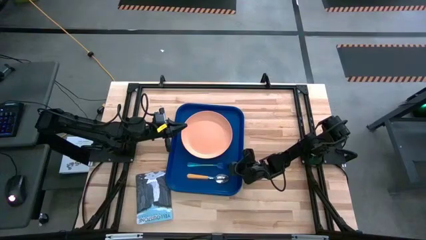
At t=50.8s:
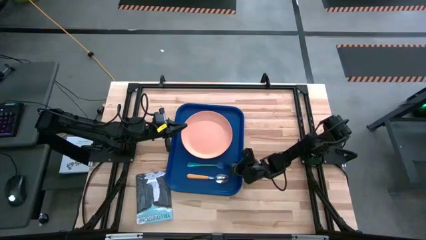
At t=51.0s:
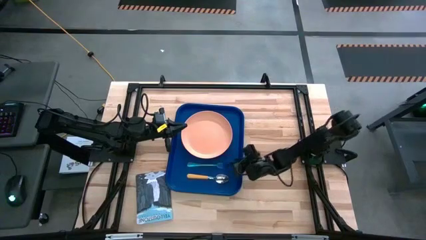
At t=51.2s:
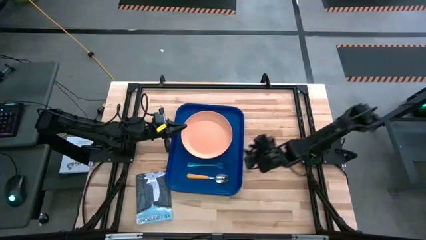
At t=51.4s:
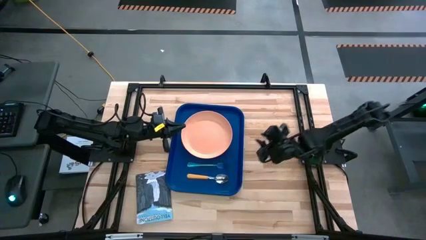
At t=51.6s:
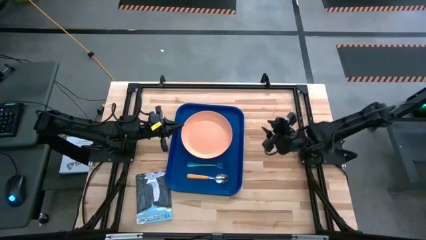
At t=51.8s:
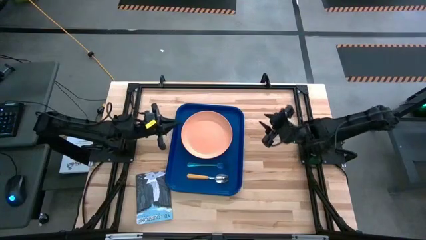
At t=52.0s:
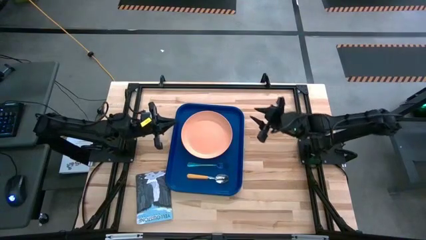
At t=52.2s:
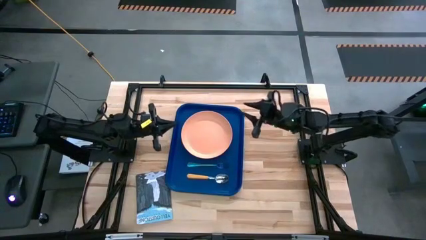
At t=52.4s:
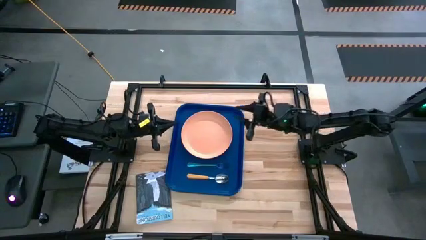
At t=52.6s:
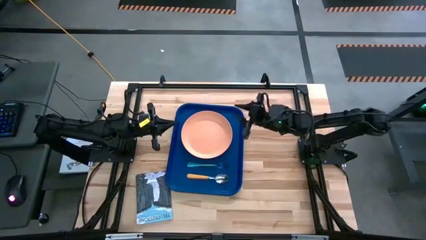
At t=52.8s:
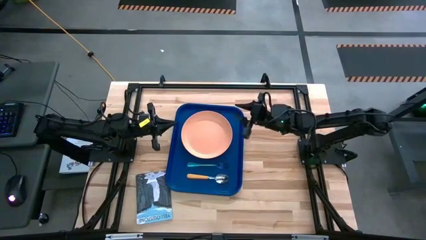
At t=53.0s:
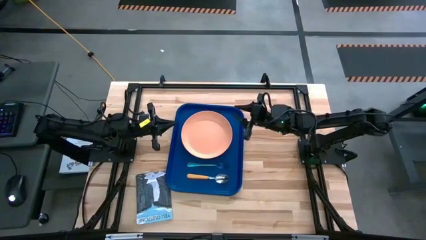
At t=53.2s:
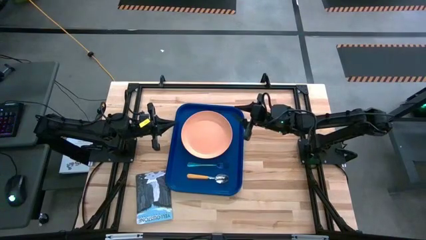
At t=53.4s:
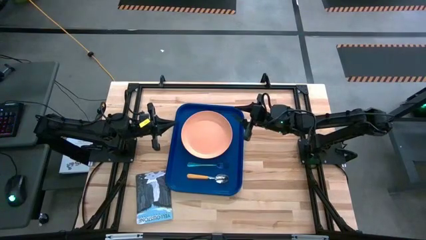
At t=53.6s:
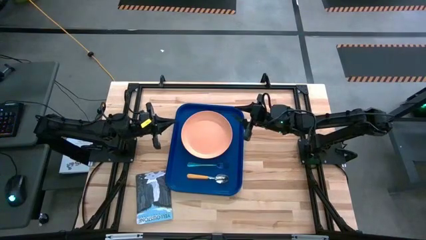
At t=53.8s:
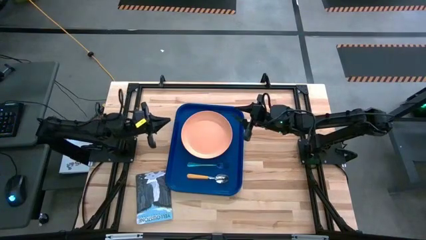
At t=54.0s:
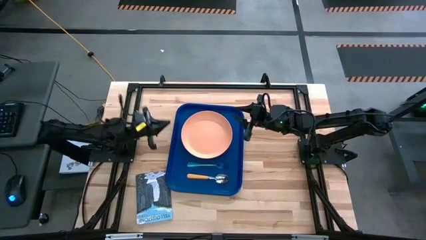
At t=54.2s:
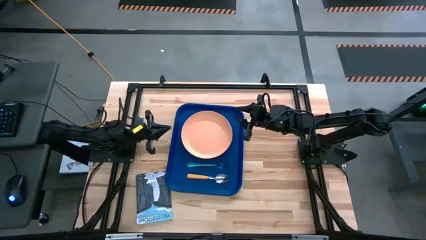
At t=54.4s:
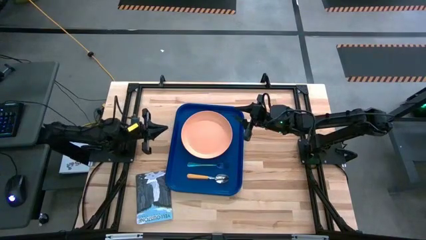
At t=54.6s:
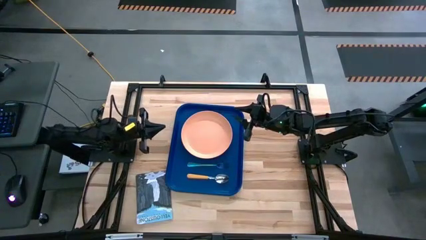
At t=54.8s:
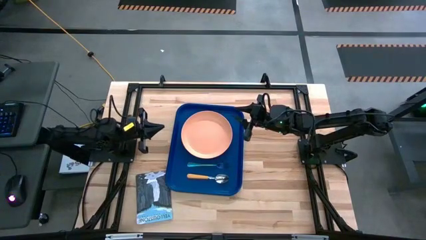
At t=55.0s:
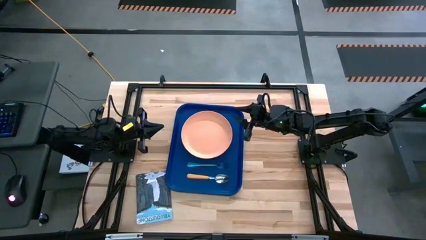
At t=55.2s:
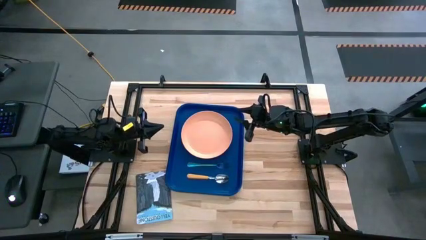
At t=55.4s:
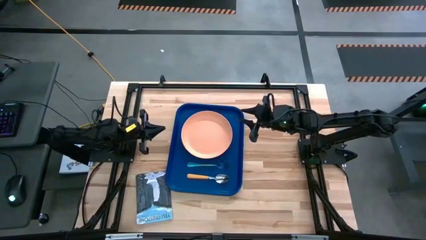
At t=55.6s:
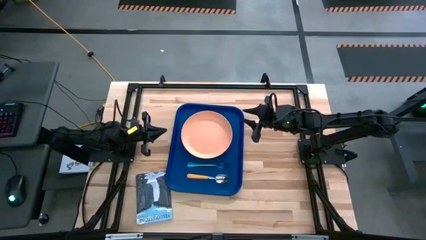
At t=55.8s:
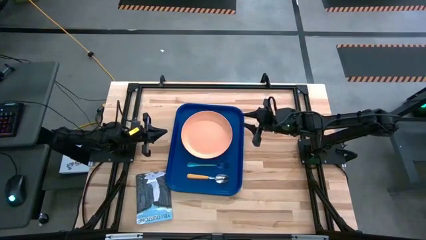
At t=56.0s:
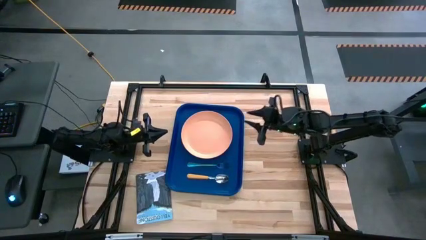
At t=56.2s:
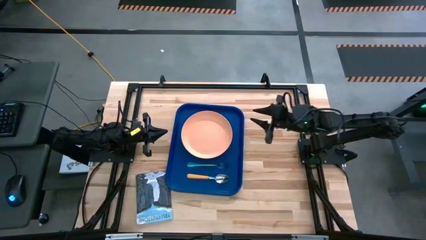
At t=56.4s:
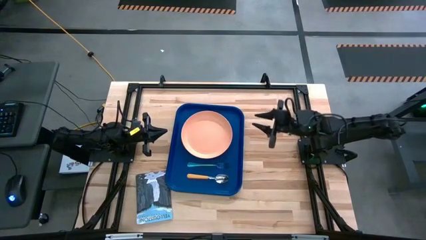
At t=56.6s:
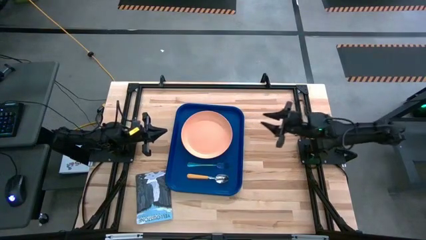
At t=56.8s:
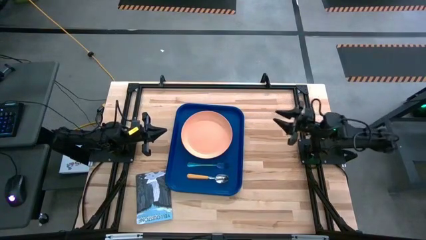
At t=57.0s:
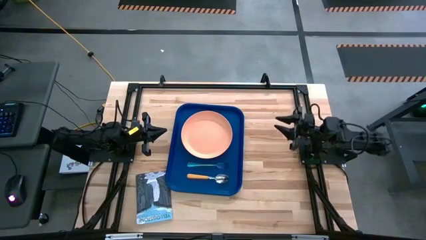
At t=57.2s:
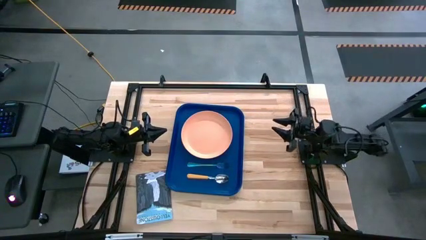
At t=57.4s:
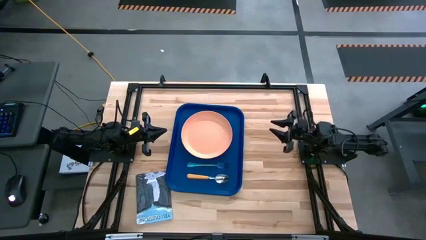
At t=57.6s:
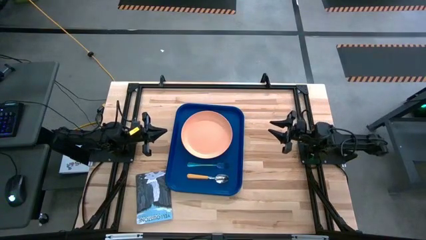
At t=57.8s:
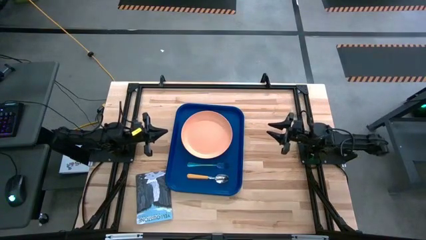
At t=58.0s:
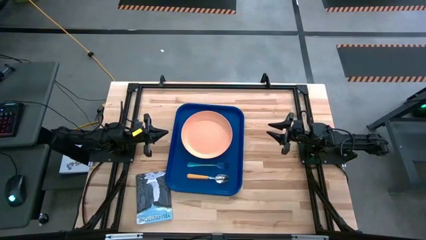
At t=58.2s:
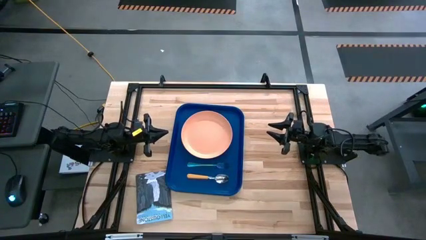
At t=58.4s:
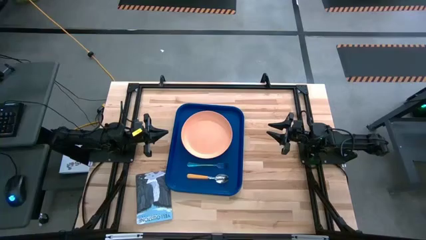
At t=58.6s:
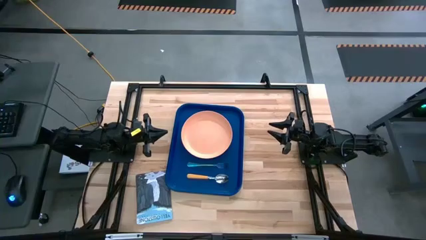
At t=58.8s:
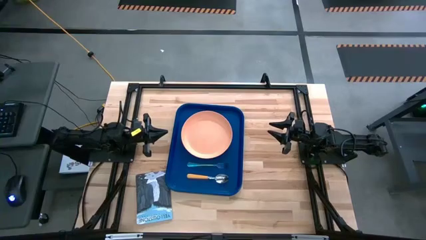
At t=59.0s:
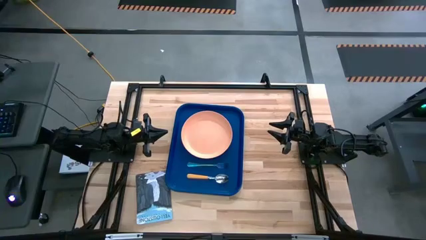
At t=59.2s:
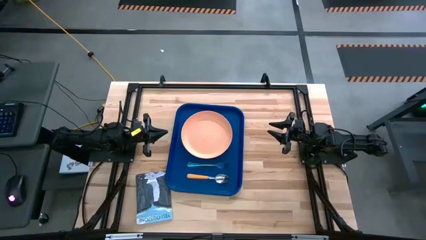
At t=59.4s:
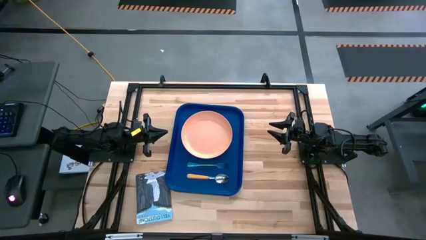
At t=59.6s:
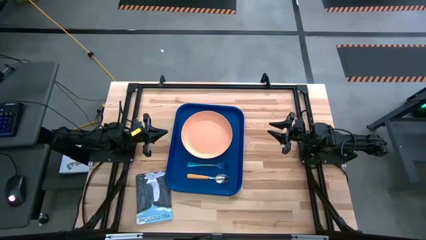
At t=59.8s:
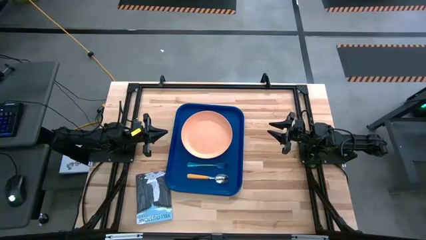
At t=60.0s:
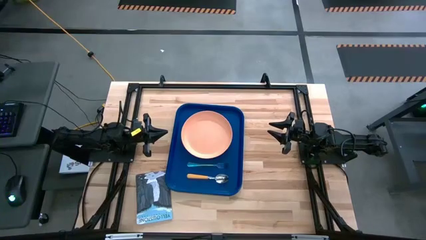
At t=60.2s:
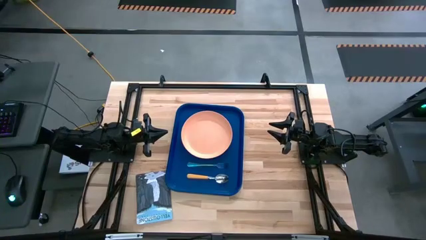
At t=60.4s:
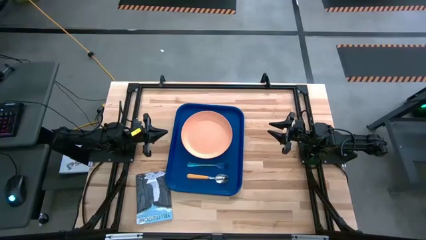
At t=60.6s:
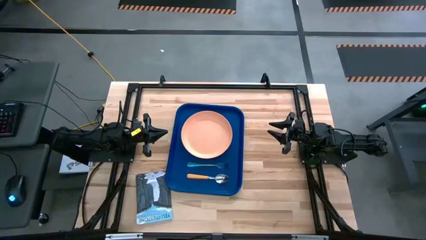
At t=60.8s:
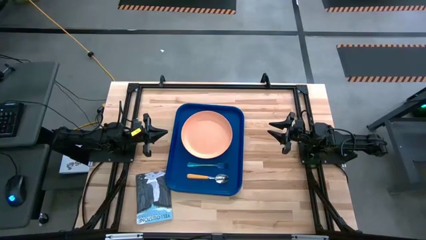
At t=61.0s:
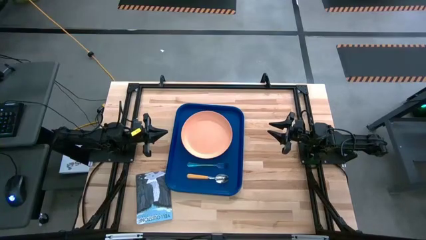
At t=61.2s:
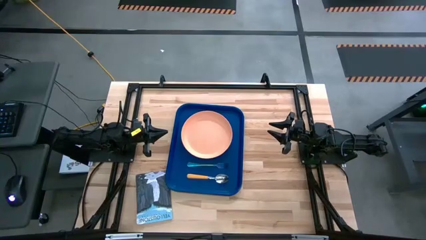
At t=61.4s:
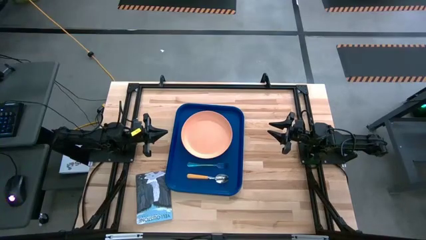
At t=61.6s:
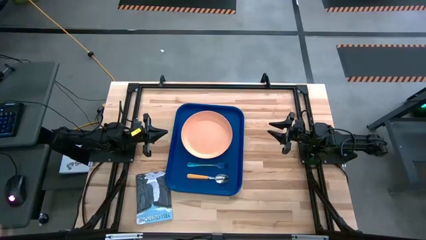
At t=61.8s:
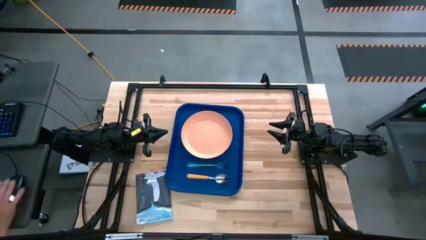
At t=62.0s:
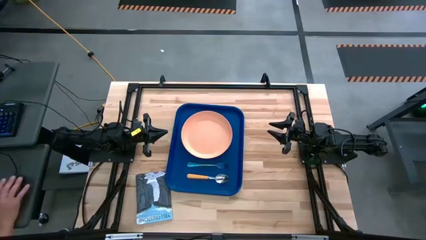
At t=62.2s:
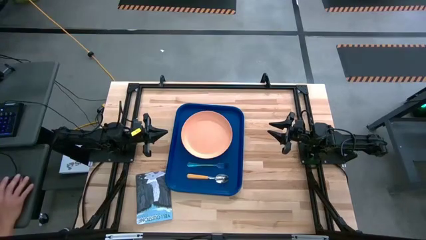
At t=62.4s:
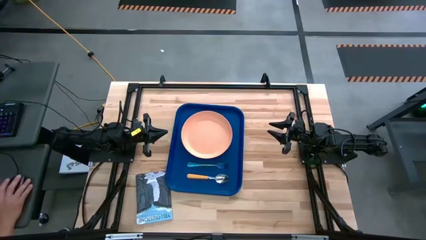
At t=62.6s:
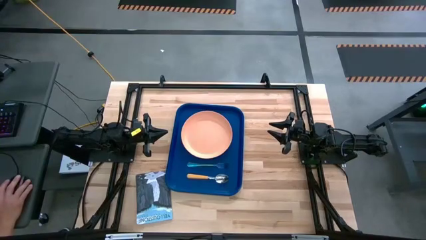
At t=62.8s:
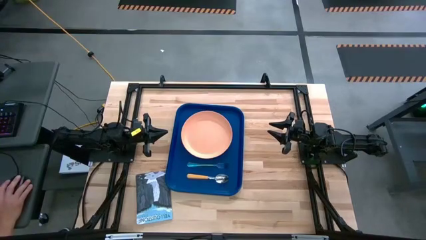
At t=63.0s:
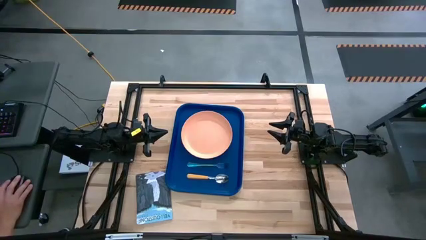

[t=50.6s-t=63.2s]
Task: Pick and place plate/cup/fork/spoon on tray
Return to Home Position
